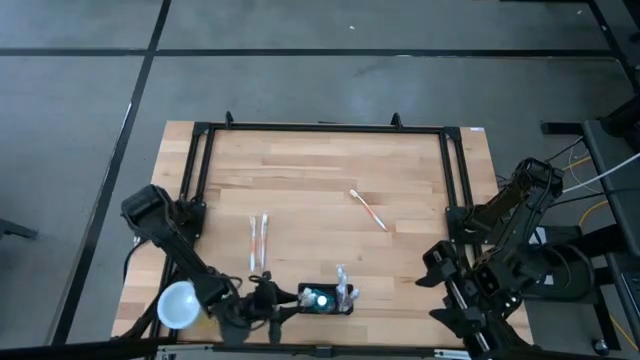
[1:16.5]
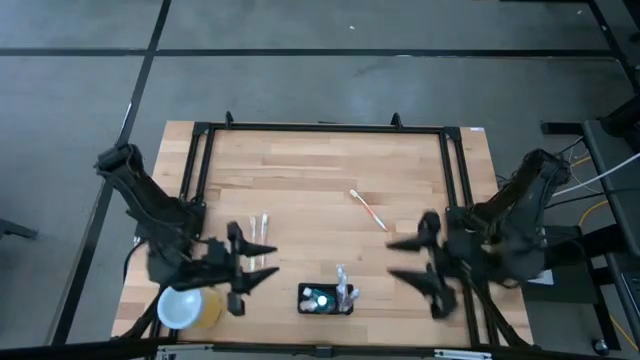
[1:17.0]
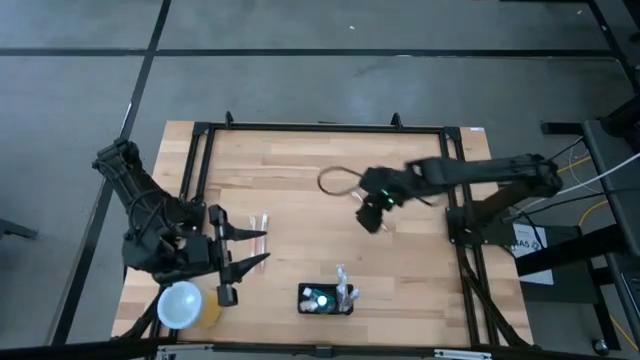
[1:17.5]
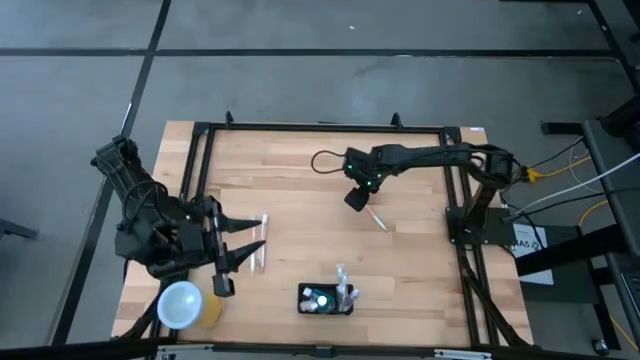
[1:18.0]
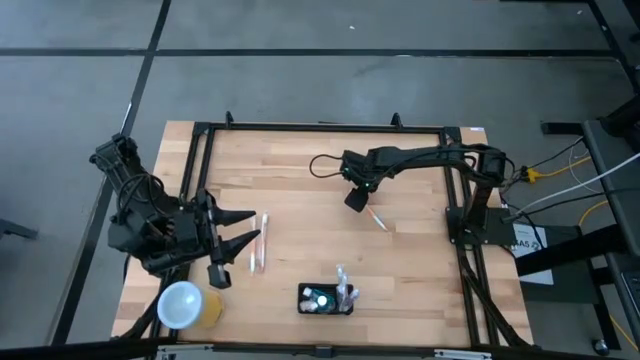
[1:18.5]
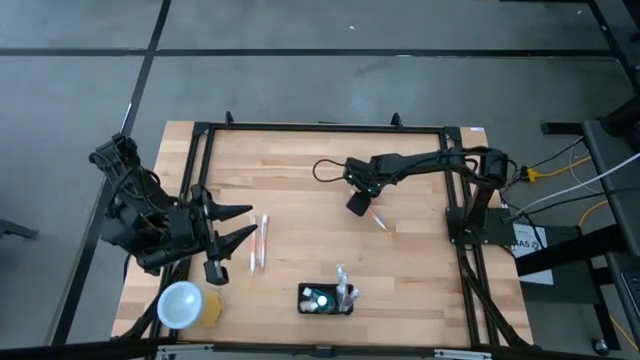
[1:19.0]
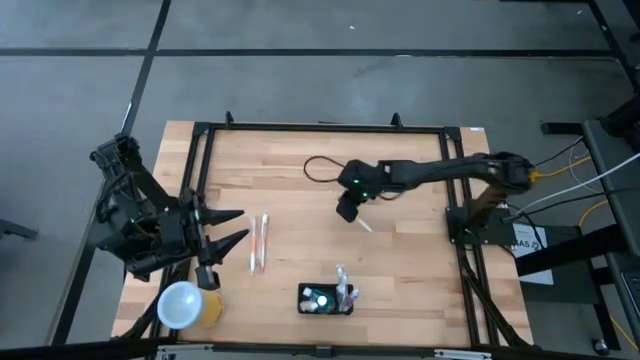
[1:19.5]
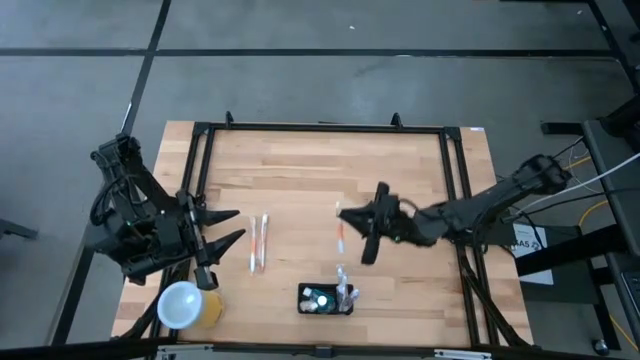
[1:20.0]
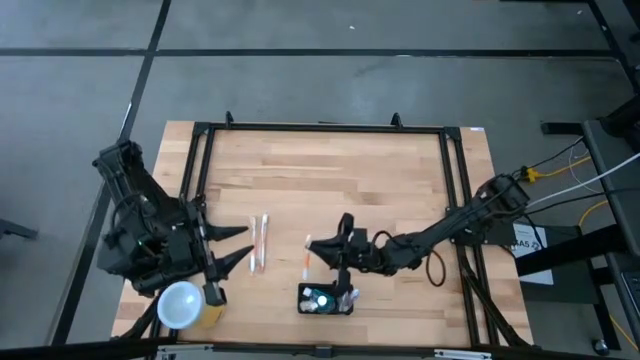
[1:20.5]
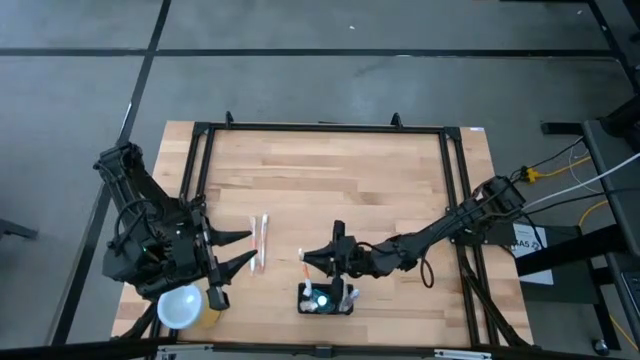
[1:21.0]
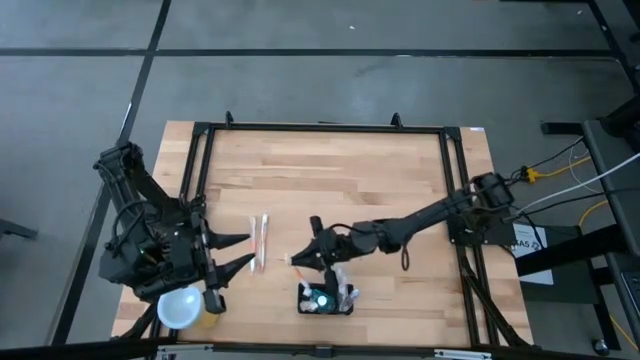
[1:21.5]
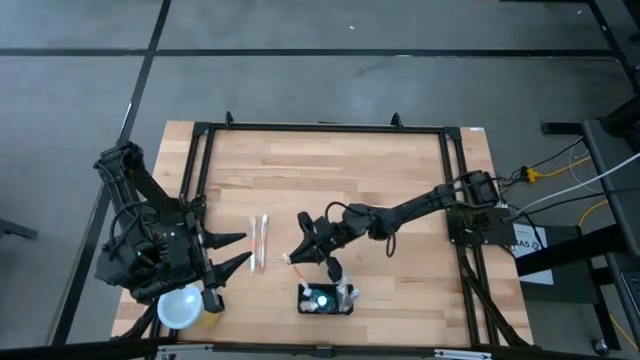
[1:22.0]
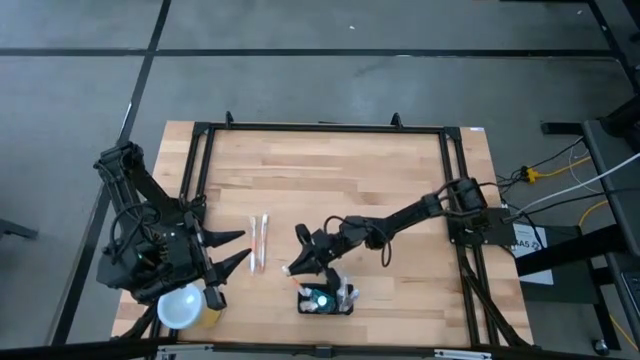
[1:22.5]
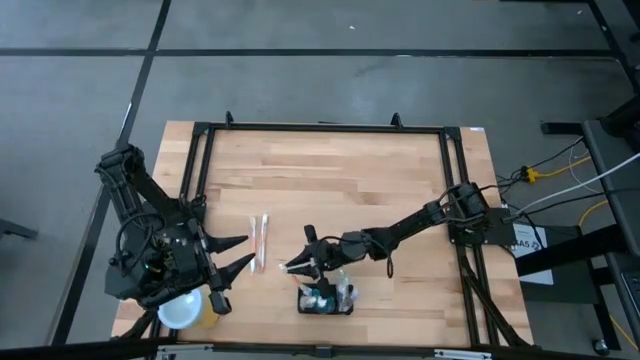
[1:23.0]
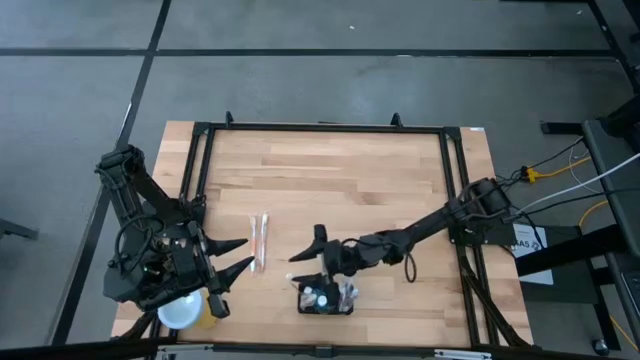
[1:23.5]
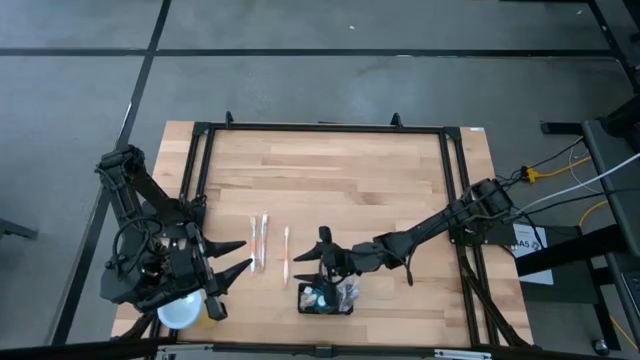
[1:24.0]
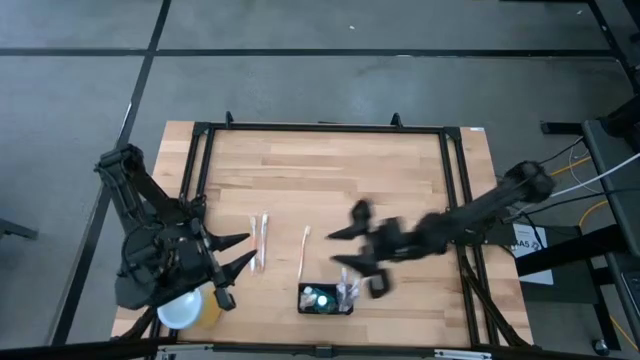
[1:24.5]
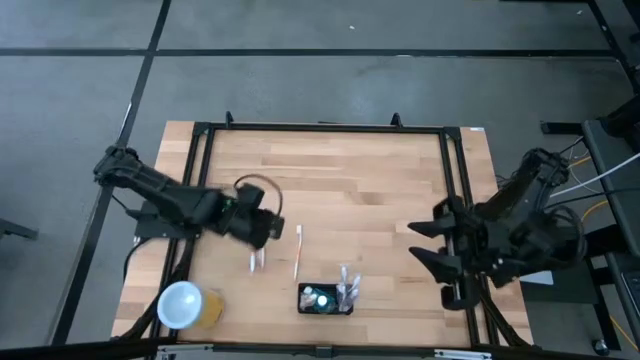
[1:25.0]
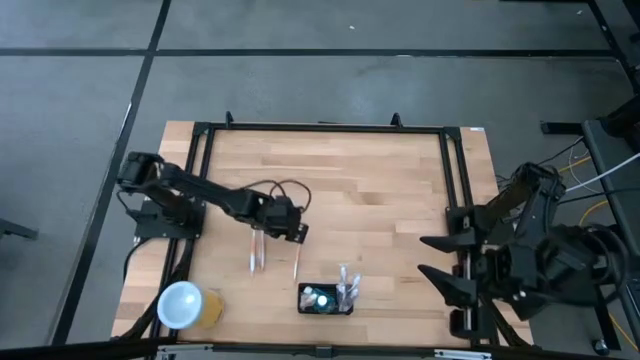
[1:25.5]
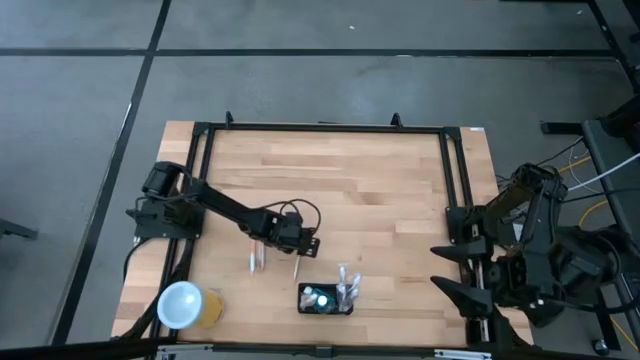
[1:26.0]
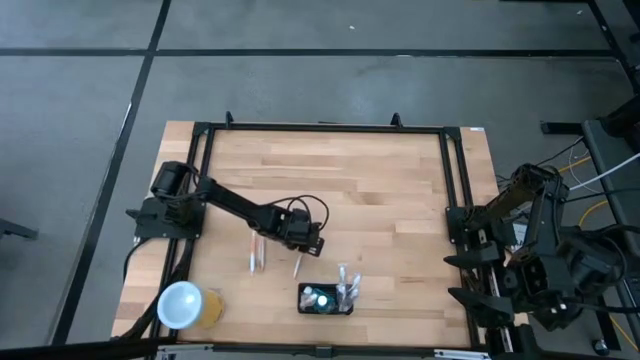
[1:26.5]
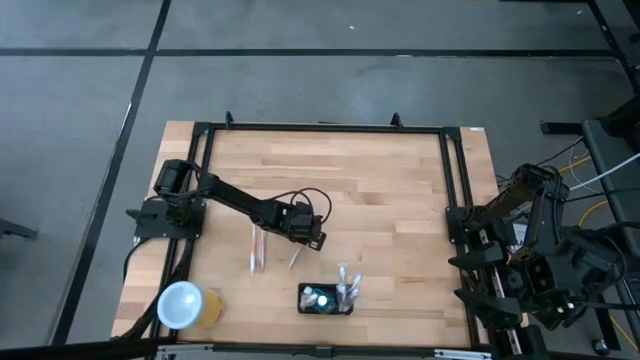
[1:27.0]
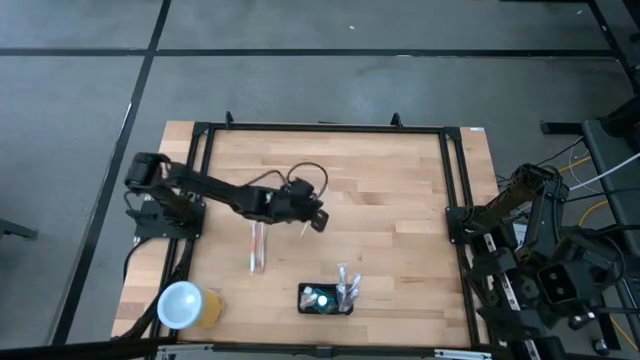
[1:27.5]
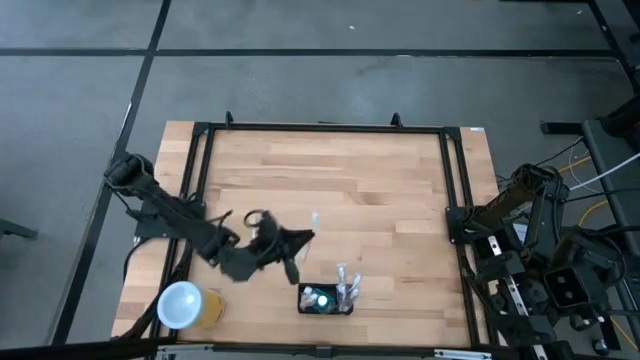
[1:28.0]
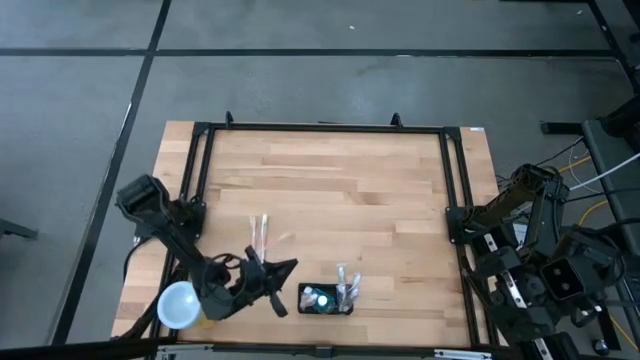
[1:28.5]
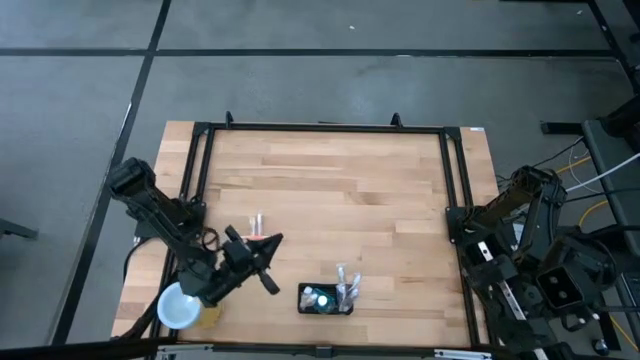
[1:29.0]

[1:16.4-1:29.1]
Task: Pick & Place toothbrushing station
Put the orange toothbrush into the mesh organizer

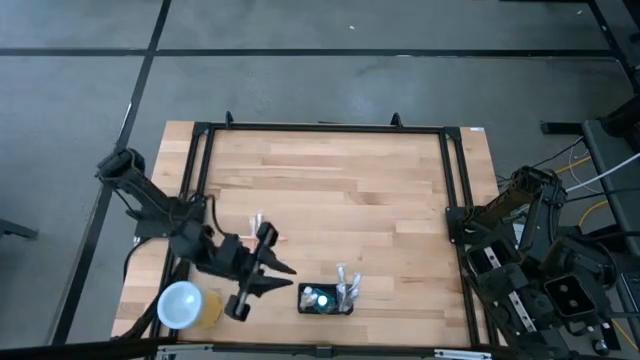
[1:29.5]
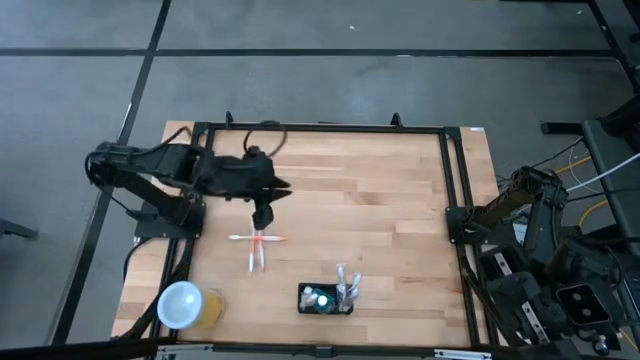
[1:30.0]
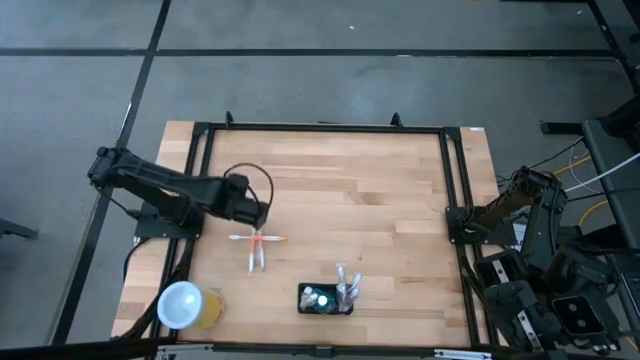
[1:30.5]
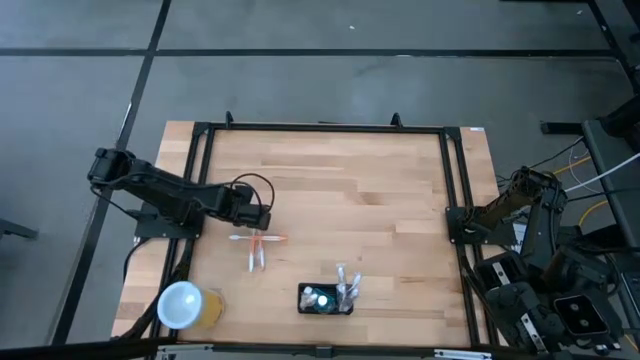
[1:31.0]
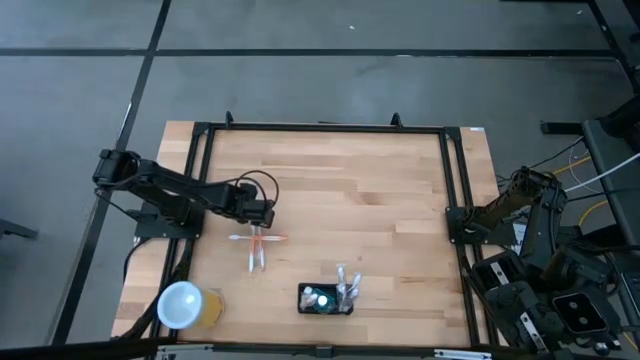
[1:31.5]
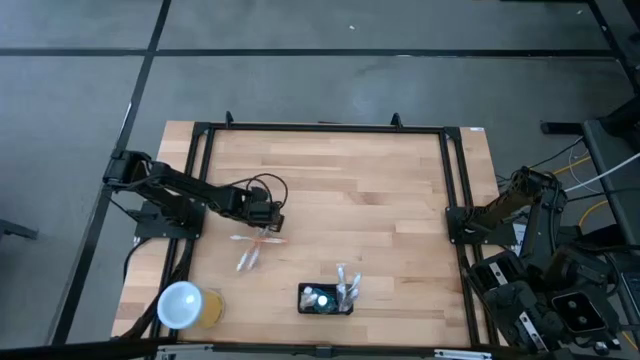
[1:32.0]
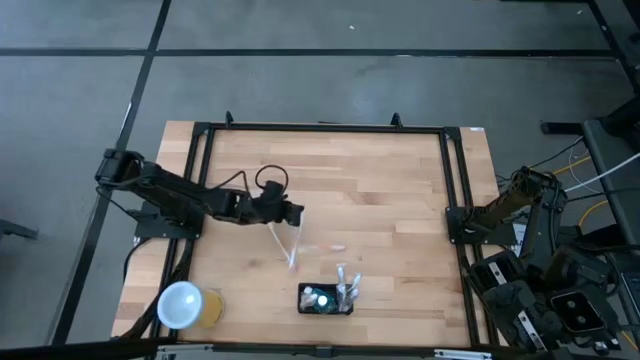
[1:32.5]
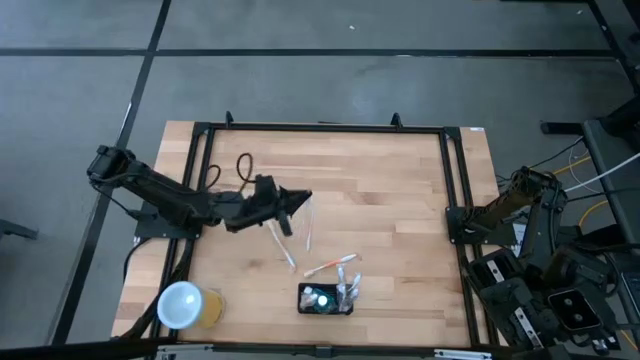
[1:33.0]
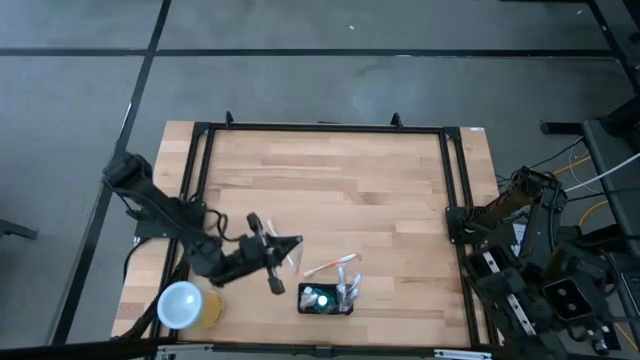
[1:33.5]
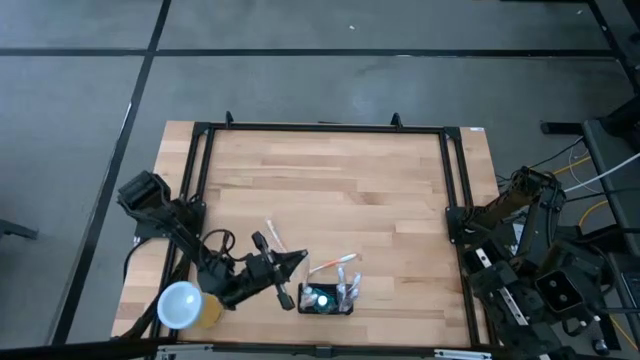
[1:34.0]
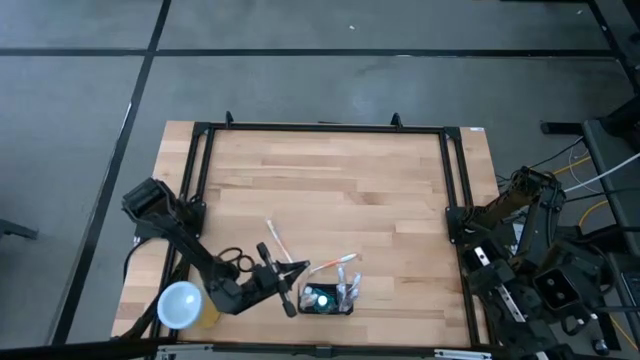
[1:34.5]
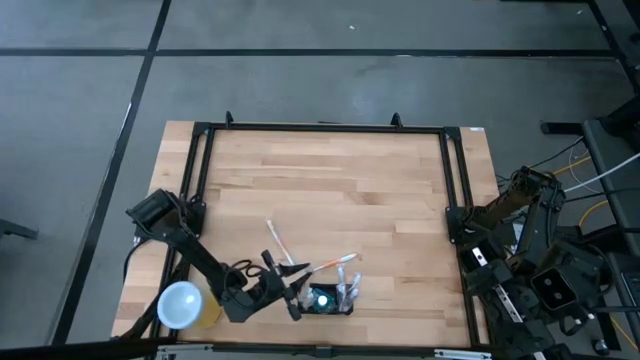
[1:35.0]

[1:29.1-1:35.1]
Put the orange toothbrush into the mesh organizer
